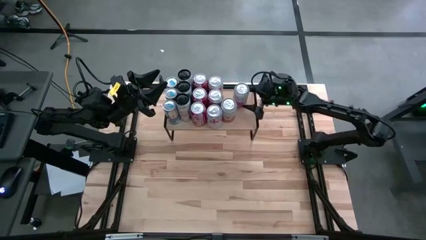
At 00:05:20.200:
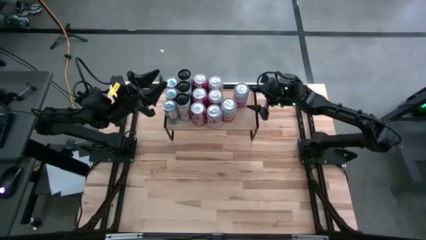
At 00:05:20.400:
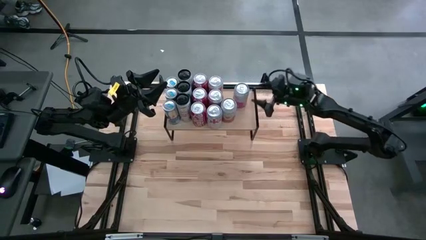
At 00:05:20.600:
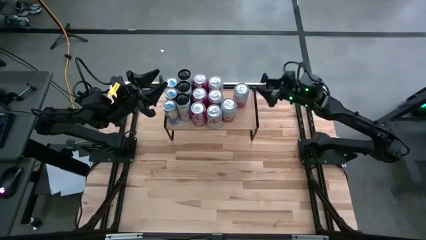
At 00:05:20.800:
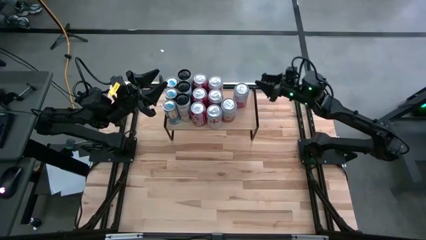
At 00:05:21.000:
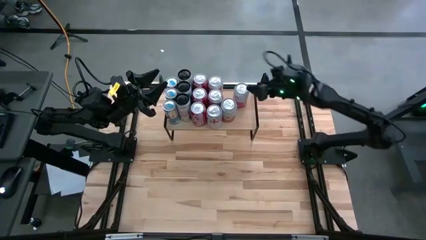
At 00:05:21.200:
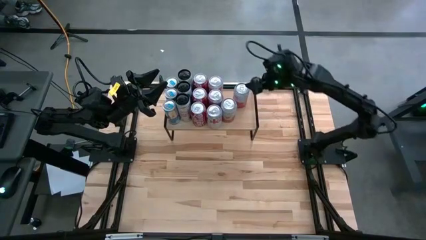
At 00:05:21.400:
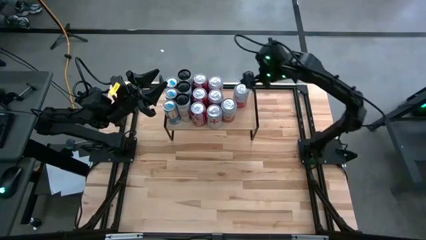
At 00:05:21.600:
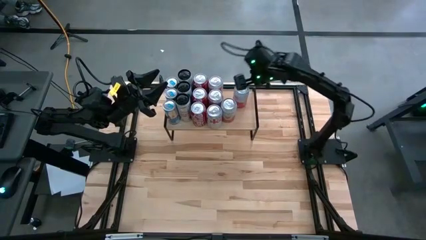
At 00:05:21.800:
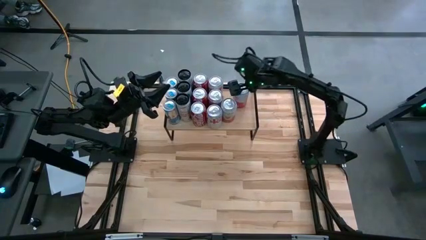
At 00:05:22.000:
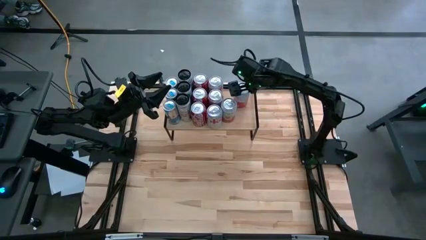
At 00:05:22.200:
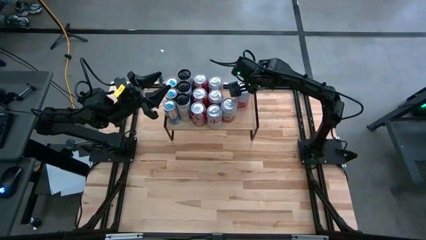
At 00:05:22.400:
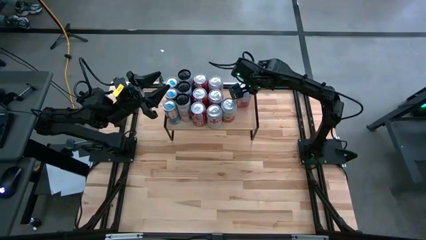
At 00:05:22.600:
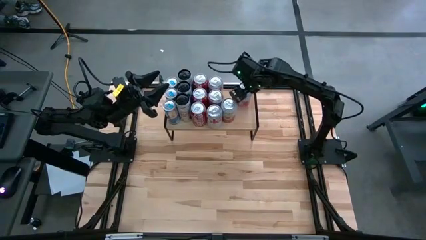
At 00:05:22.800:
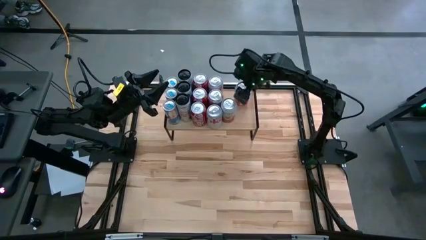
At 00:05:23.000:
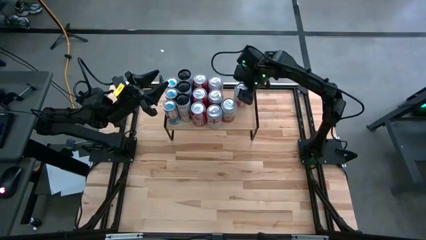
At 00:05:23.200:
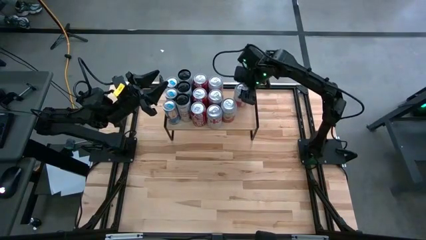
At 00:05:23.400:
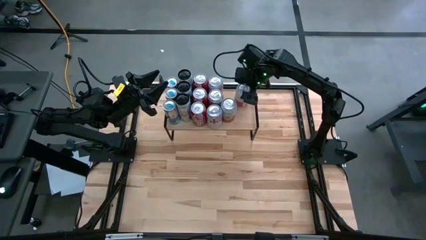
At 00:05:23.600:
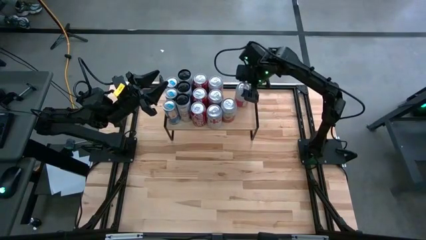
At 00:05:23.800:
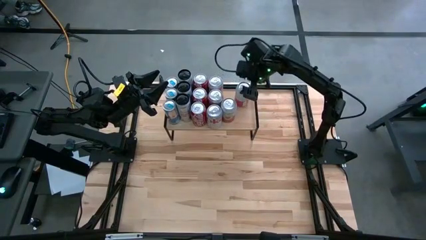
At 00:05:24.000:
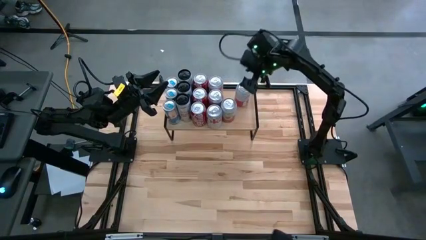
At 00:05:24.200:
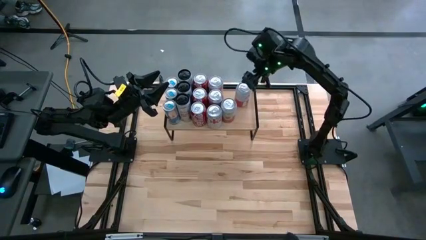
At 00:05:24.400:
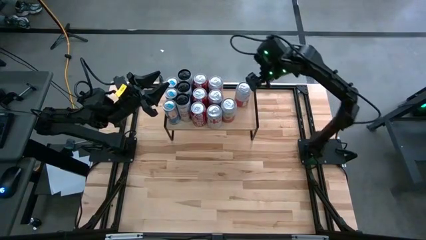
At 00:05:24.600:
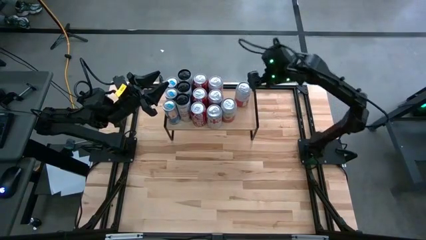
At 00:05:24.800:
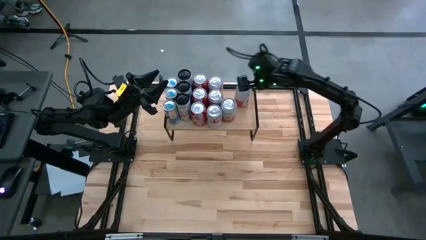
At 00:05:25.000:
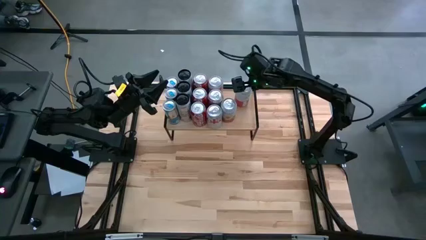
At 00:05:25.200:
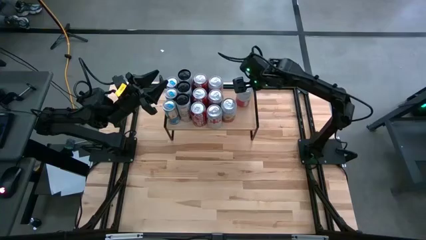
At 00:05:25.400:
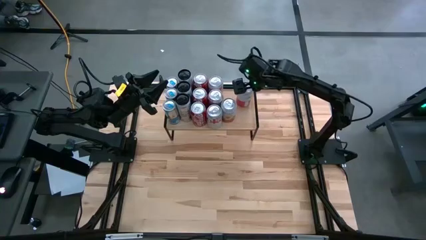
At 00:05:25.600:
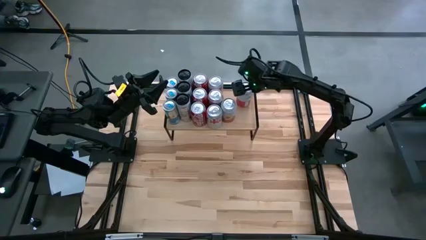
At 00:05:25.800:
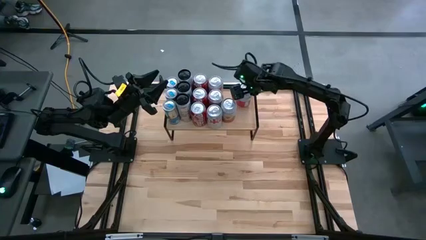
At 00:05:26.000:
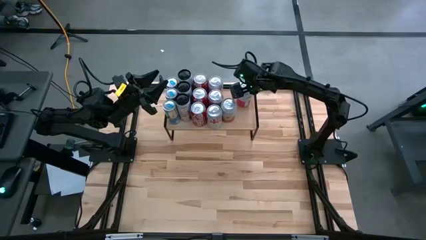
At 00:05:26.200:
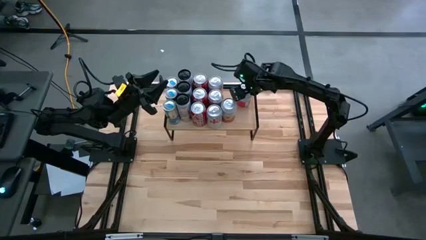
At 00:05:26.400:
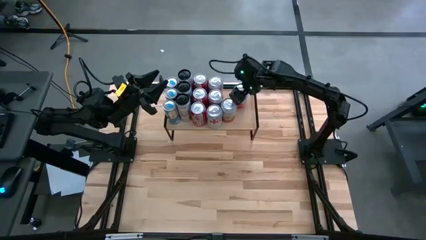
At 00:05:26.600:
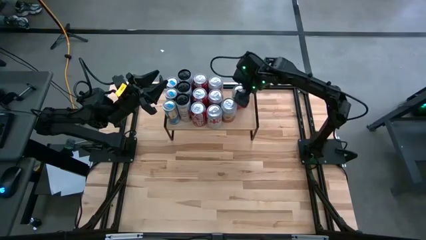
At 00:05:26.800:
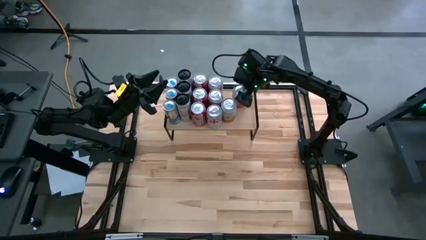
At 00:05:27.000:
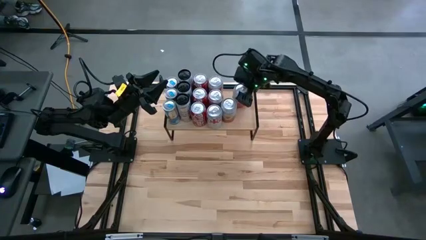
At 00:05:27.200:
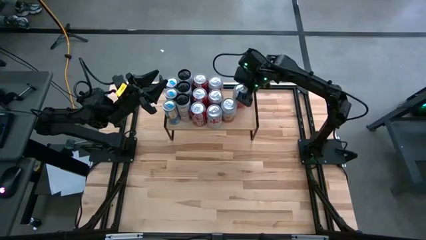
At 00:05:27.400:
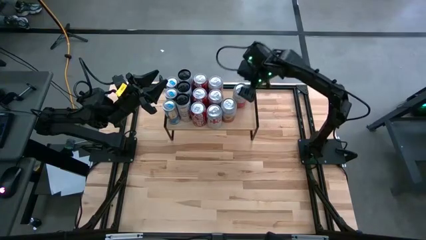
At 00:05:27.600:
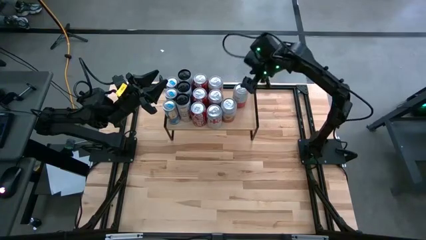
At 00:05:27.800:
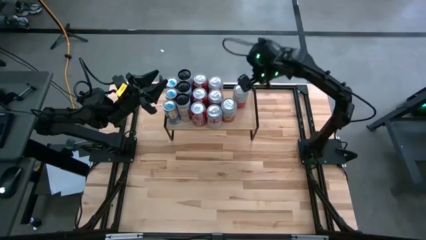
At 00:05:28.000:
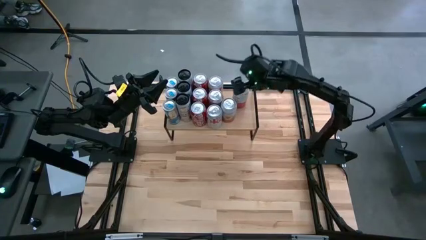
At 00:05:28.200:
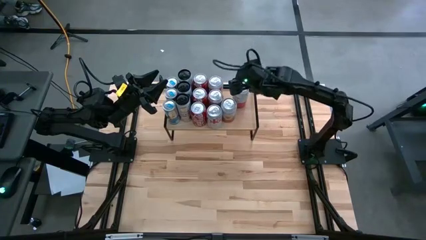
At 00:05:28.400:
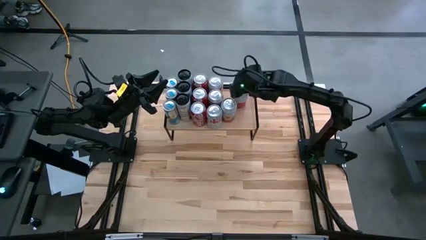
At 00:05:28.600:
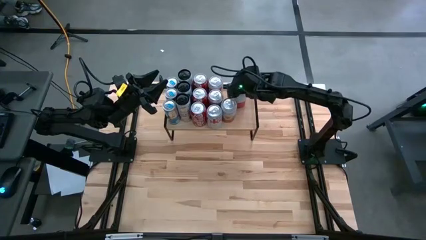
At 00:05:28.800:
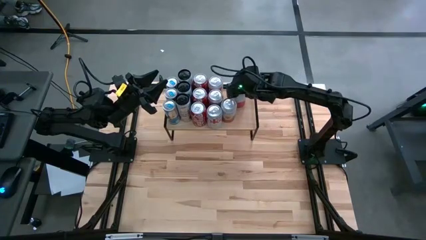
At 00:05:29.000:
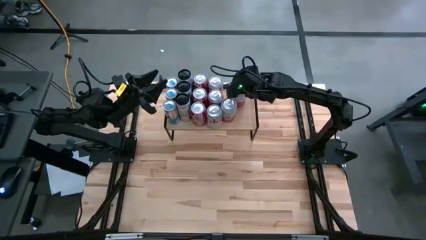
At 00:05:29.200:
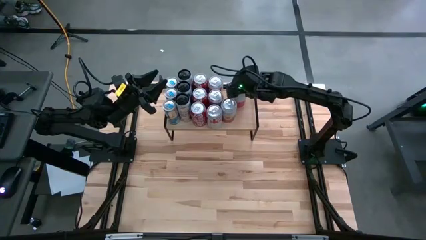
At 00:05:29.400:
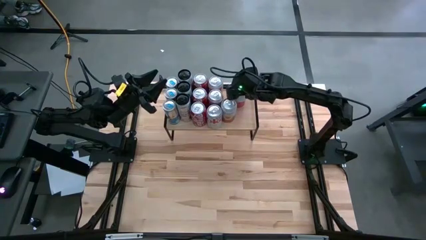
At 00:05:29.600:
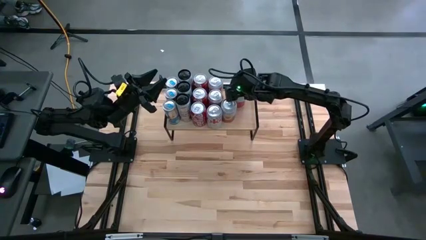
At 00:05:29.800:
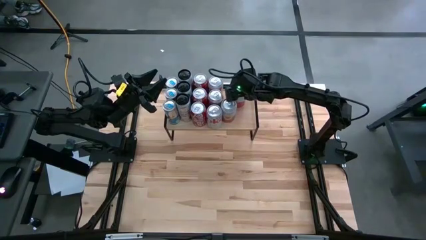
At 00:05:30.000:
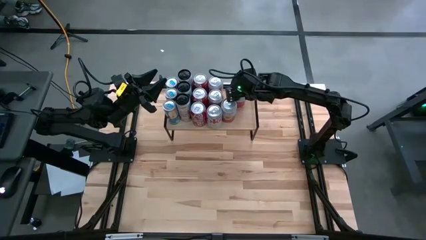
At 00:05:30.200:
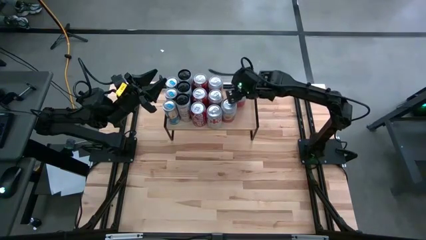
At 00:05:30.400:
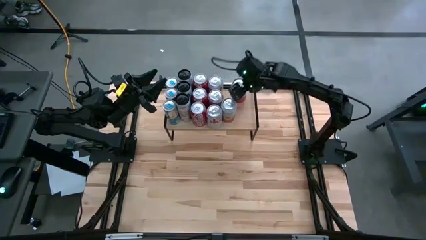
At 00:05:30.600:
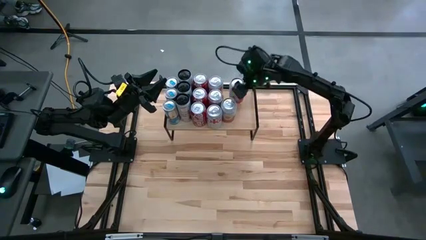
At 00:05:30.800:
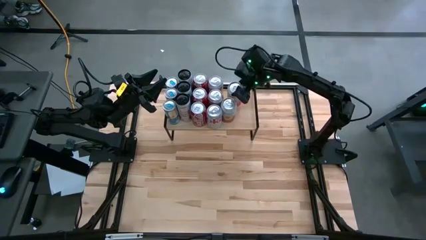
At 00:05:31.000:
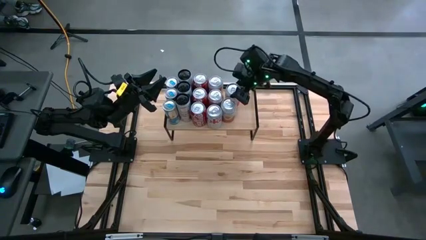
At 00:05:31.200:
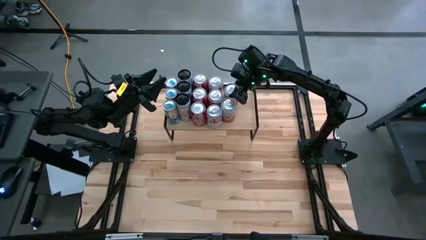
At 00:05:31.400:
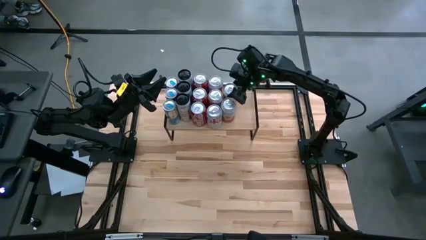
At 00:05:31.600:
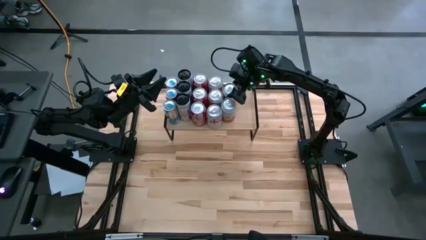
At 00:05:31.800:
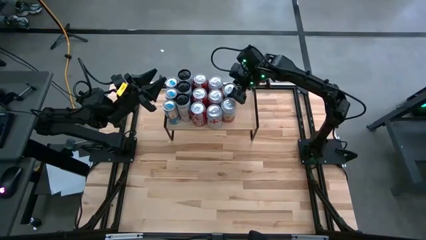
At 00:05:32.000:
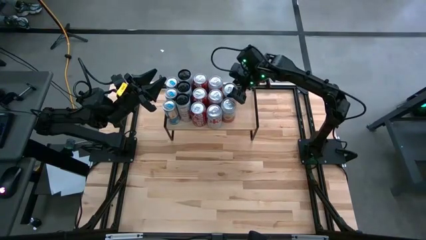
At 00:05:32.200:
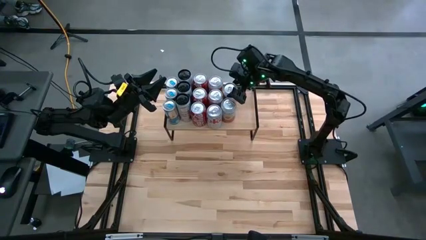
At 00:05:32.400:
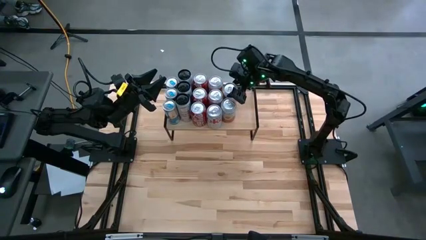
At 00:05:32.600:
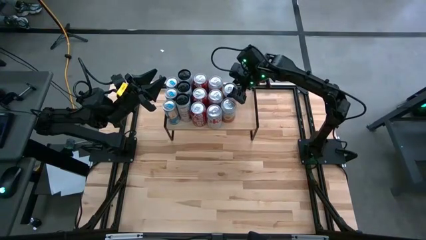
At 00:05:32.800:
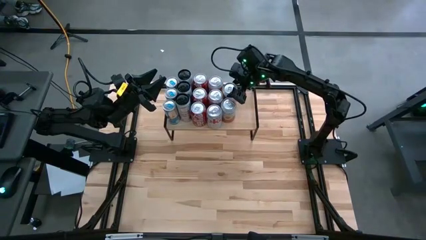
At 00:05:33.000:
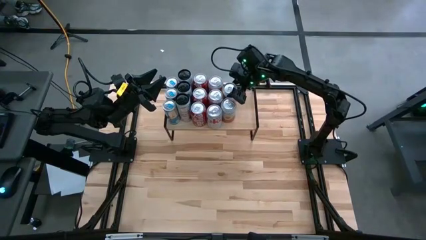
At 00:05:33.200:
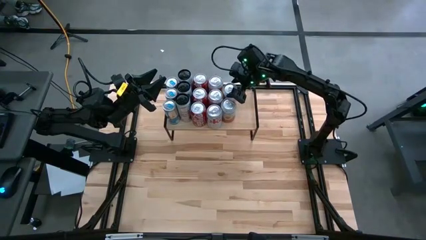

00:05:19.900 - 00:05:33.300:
Task: Place canned beverage on shelf
Put the pink-white soda can aligned with the other pink-white soda can on the shelf
